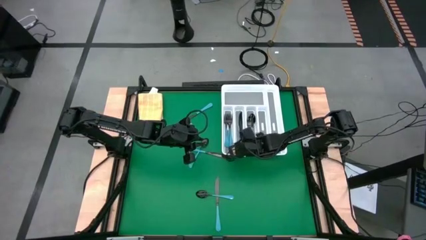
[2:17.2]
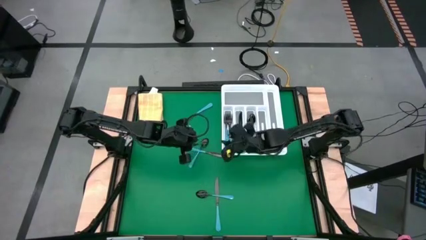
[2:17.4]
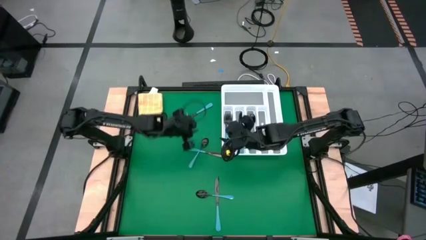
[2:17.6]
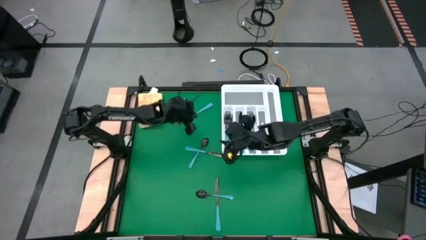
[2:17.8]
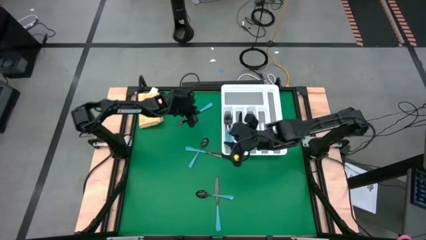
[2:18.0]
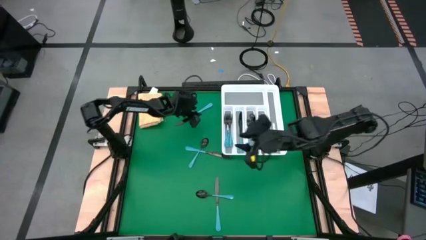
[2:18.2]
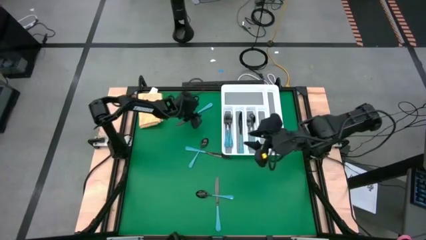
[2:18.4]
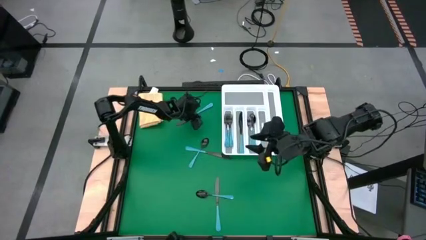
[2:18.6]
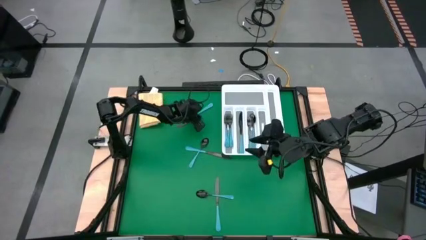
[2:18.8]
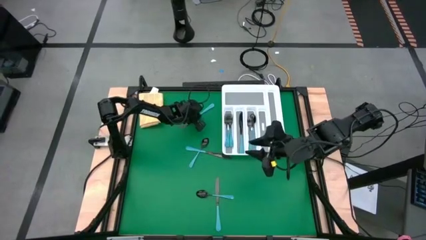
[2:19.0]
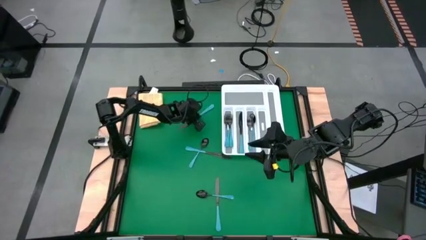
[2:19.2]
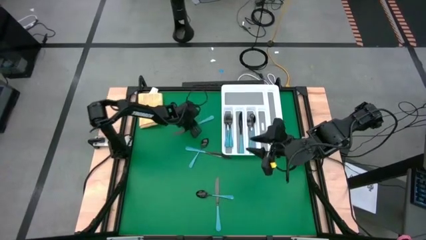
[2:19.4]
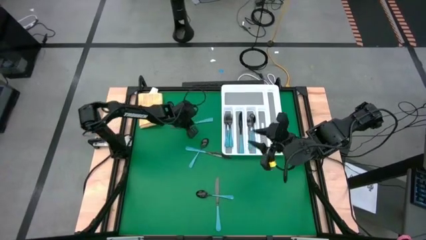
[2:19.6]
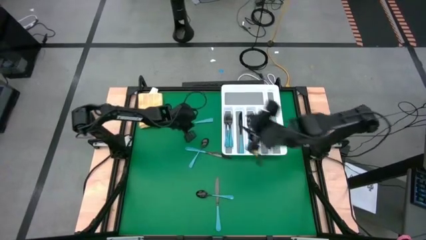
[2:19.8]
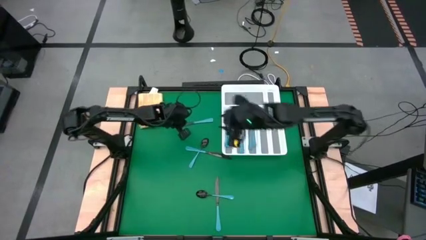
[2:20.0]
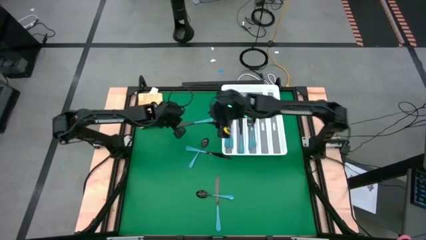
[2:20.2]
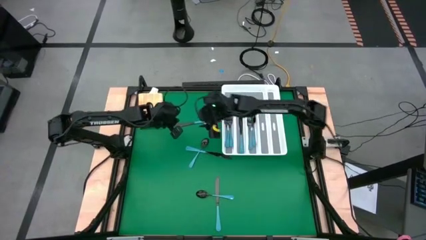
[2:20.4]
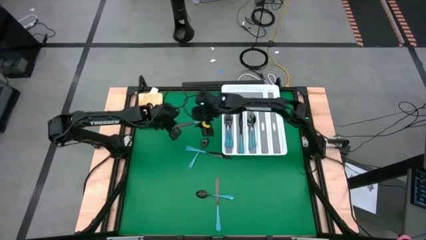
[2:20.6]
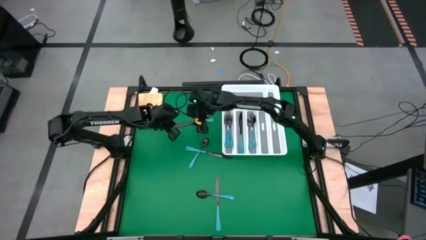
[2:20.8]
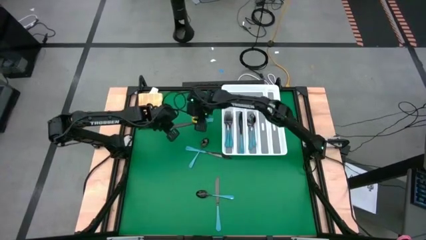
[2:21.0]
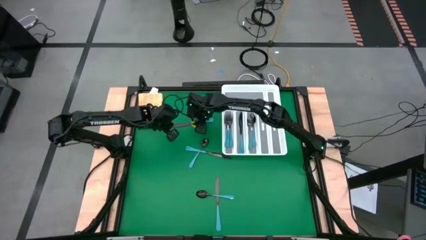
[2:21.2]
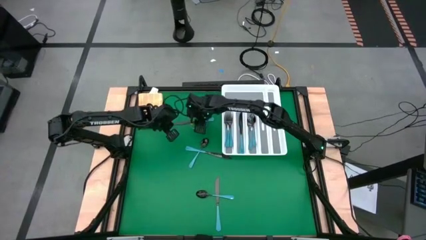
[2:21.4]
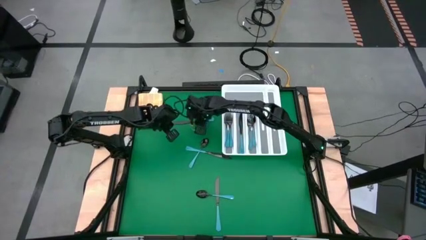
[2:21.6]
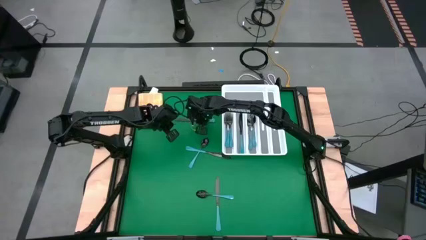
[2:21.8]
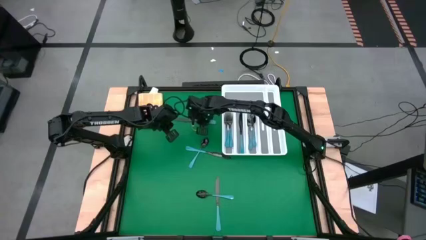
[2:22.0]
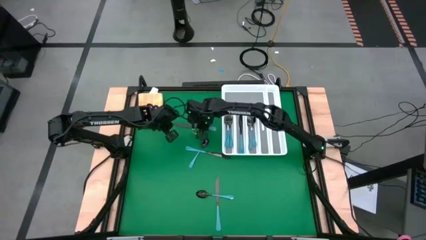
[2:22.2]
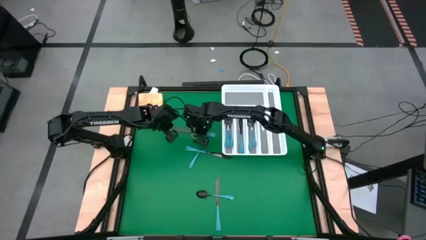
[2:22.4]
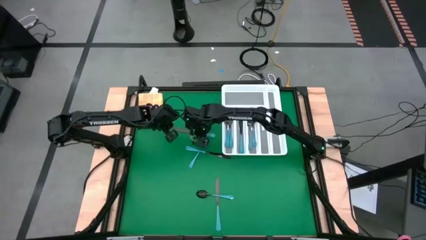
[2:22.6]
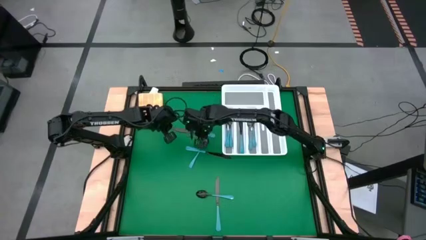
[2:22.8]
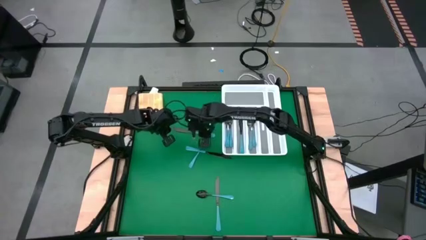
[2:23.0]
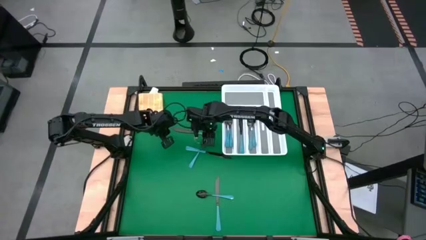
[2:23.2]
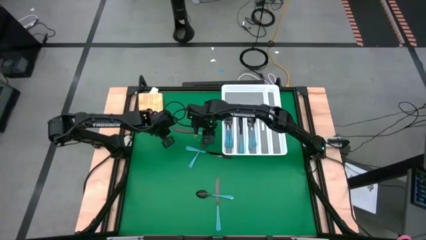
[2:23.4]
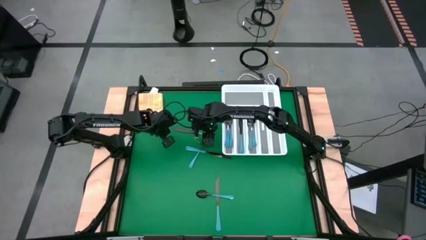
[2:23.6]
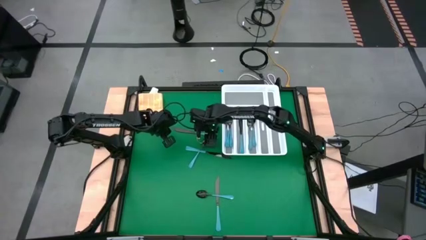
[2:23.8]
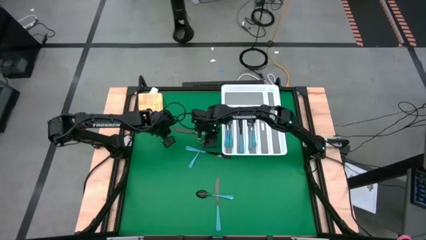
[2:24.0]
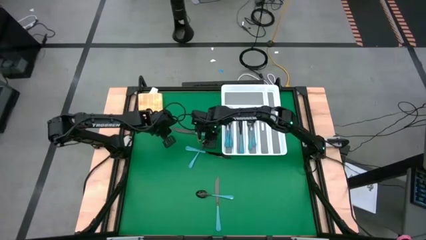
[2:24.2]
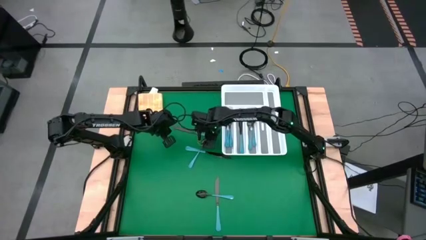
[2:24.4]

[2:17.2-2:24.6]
Task: Sort silverware
Put the blue table knife into the silverware organizer

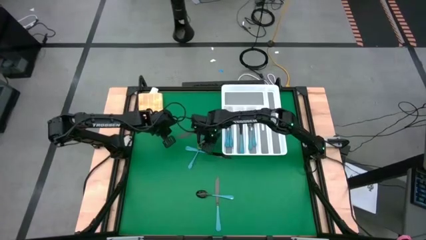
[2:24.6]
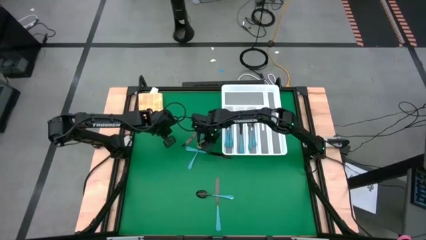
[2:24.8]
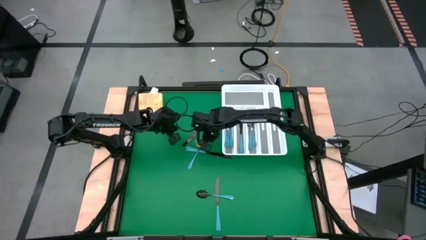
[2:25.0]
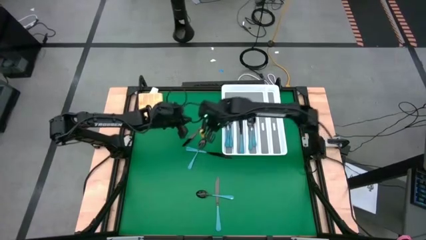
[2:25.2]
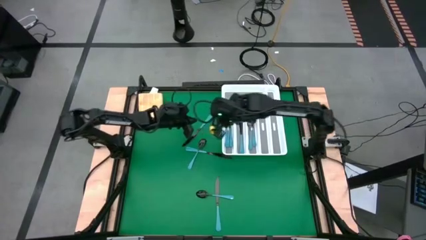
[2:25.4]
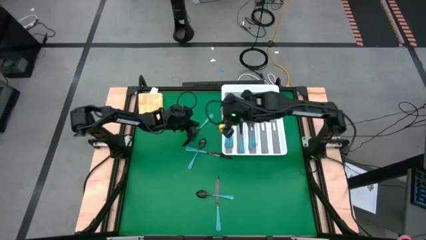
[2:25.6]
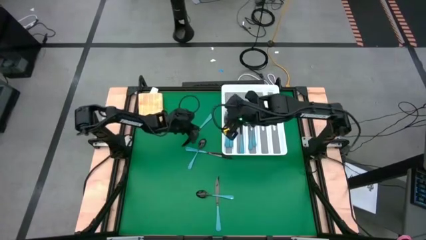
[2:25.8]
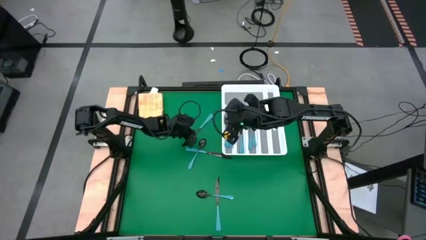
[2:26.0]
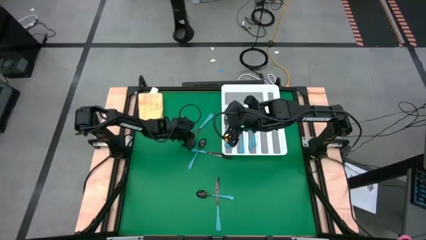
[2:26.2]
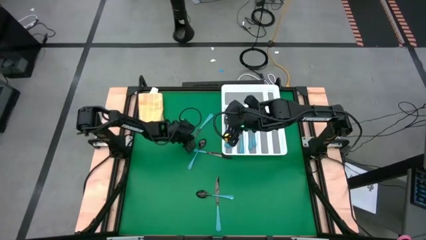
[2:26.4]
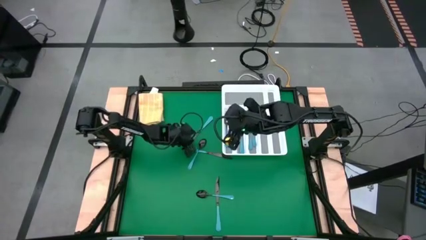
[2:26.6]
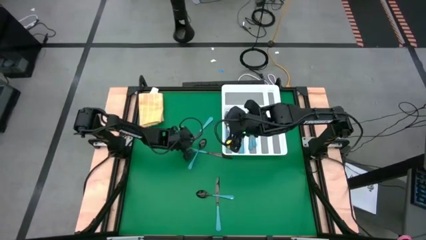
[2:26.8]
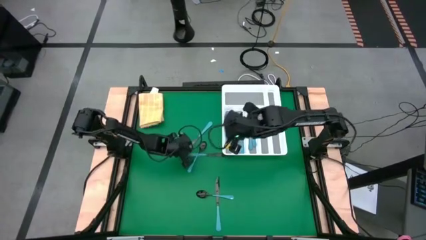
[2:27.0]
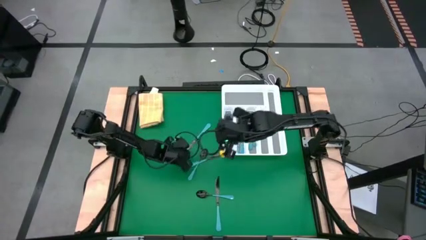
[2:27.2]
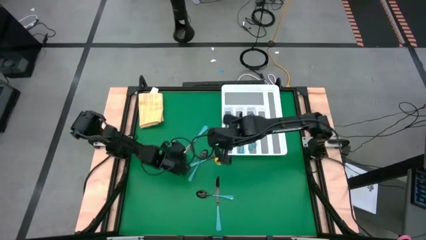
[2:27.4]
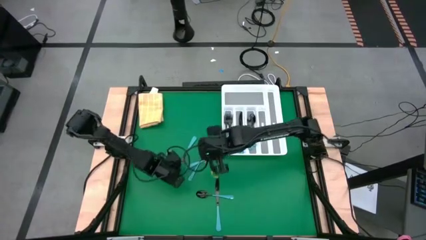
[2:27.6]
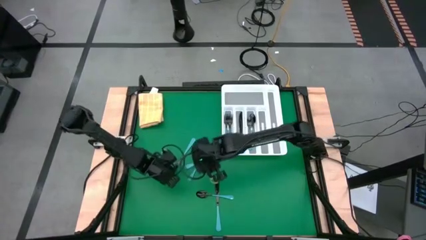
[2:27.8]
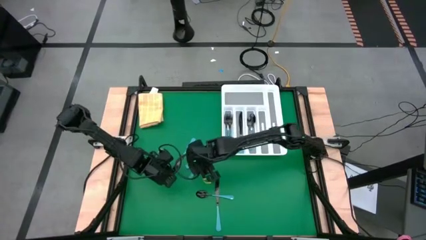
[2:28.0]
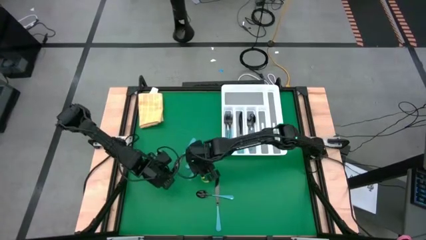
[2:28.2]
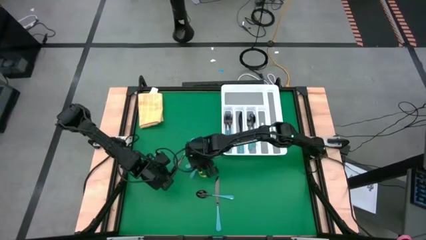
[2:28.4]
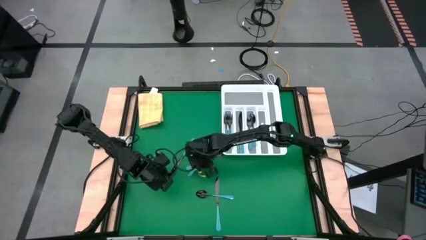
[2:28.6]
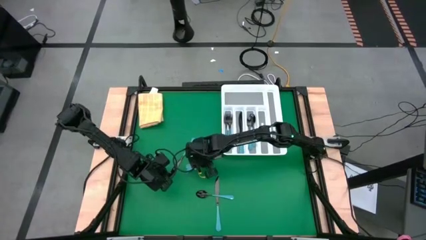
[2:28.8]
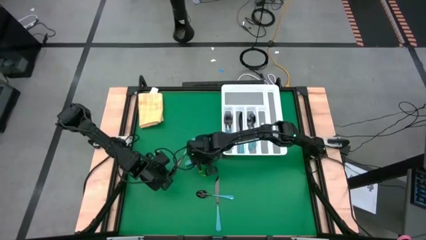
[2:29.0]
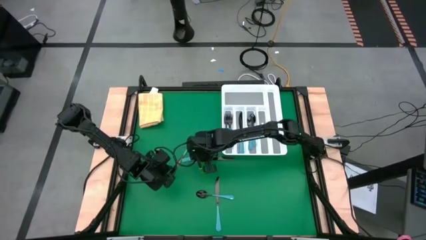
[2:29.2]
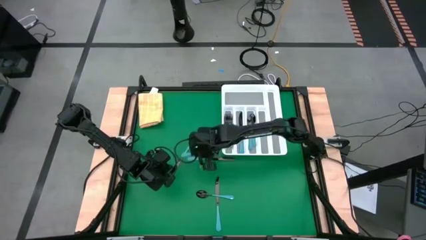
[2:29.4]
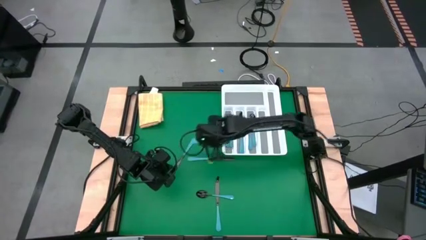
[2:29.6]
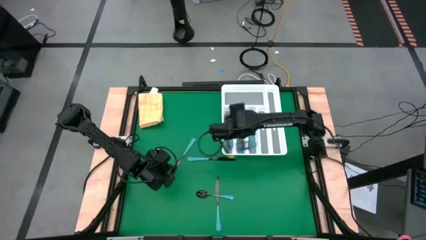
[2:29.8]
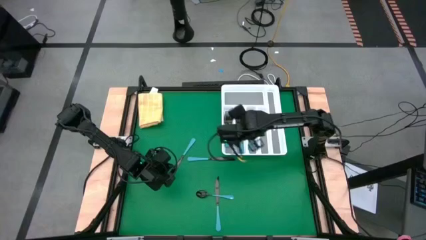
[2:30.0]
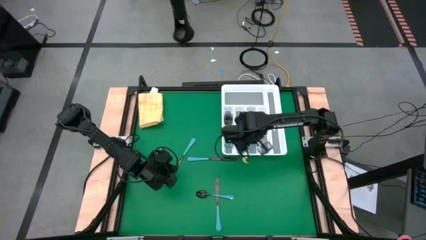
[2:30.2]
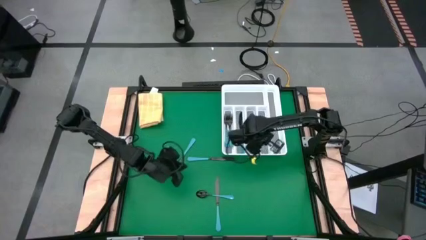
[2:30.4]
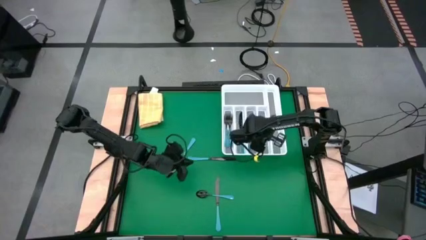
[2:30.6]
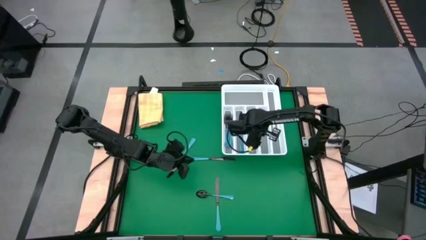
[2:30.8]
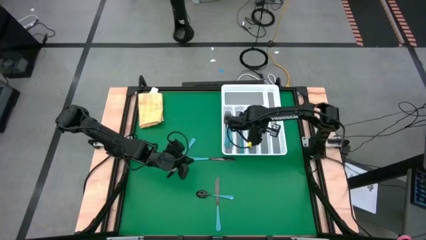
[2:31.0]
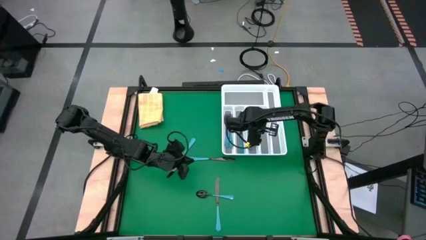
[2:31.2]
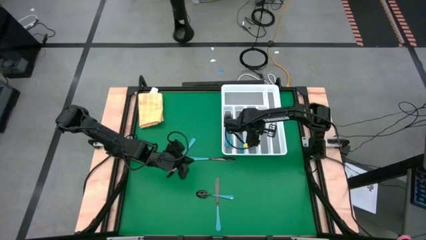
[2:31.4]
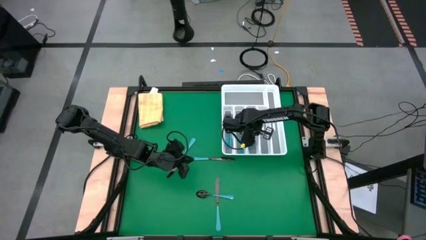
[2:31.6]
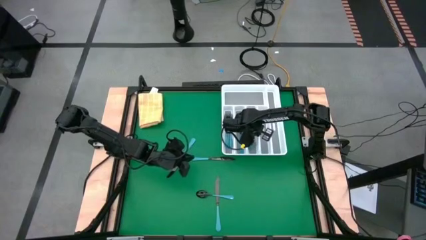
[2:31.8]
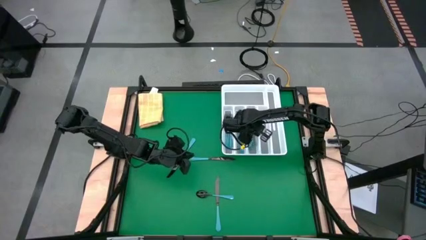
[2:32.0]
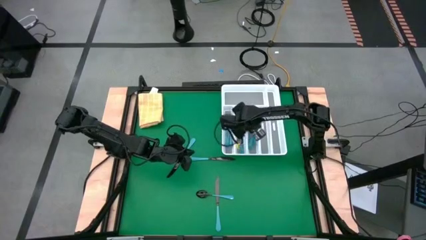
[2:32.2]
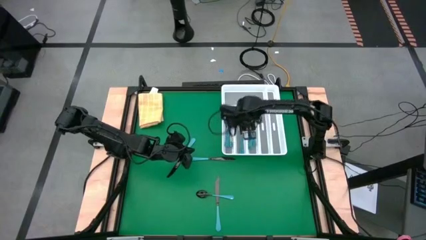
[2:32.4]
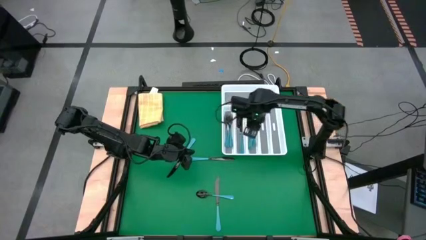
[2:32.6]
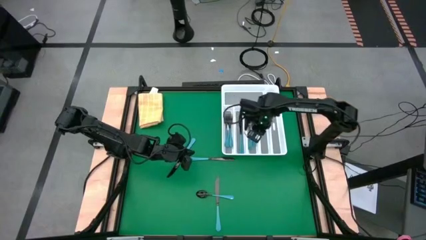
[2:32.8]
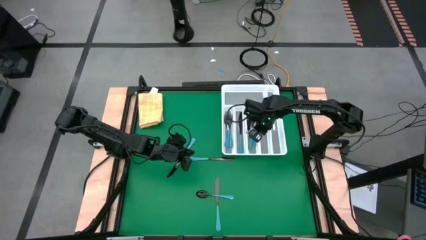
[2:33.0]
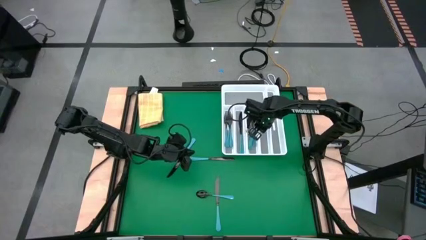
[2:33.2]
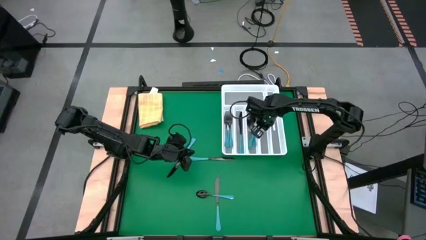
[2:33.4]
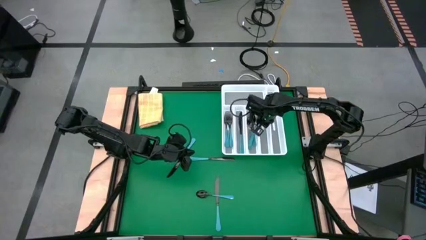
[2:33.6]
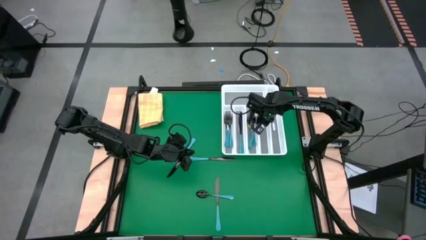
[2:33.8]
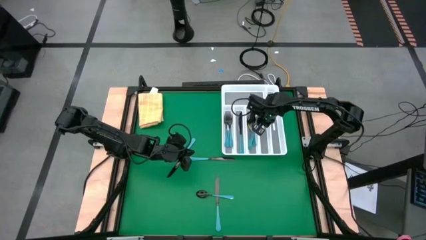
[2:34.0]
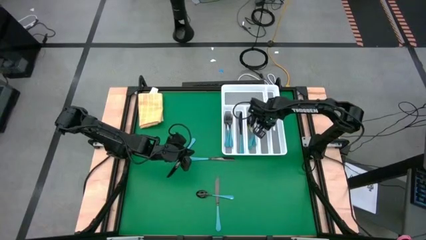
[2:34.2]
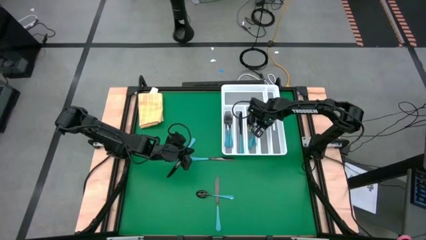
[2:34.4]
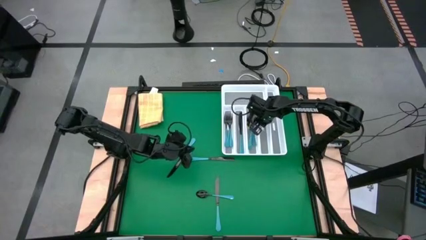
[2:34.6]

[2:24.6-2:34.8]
Put the blue spoon into the silverware organizer
